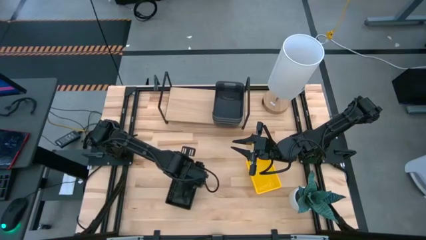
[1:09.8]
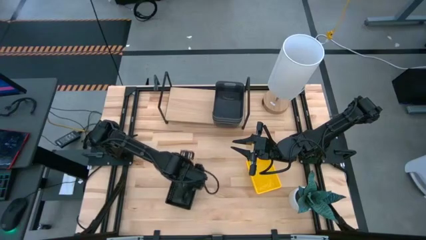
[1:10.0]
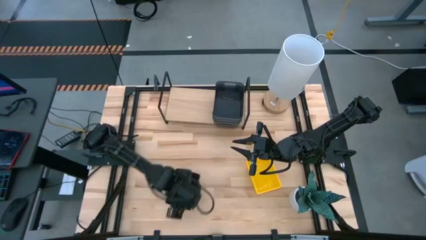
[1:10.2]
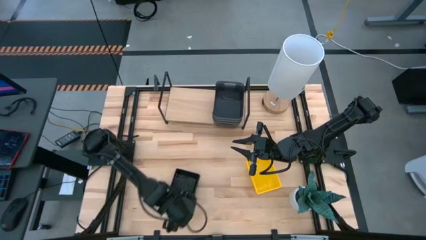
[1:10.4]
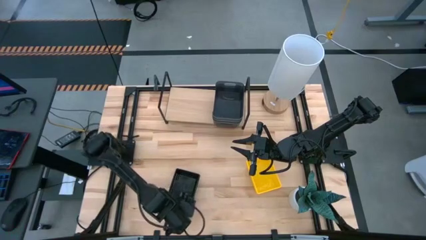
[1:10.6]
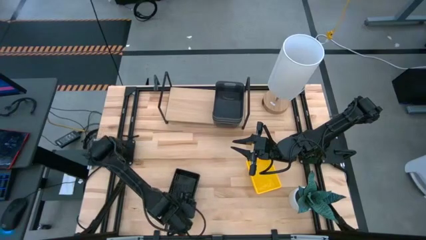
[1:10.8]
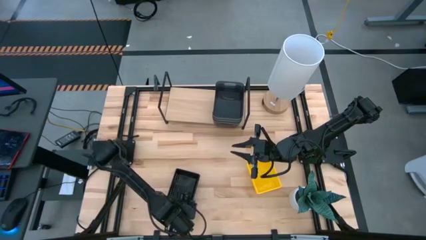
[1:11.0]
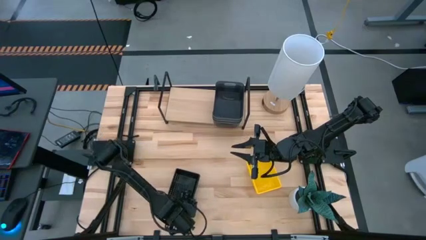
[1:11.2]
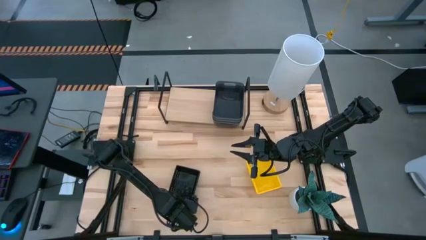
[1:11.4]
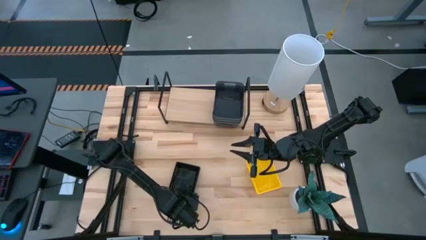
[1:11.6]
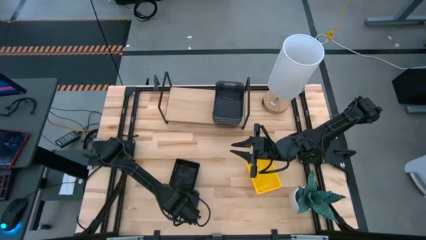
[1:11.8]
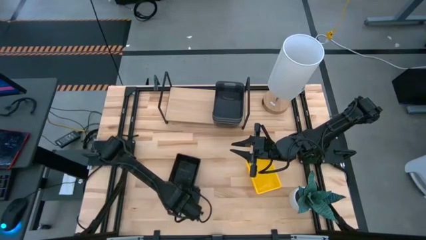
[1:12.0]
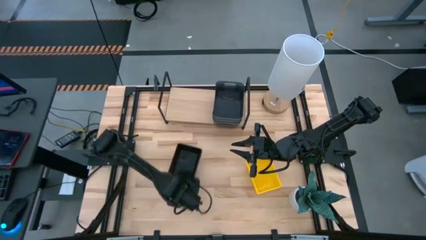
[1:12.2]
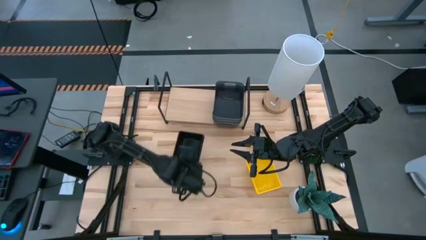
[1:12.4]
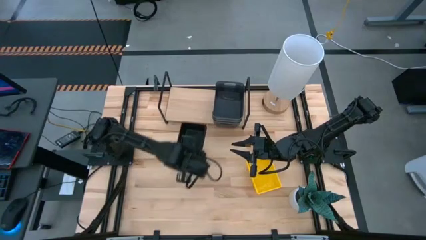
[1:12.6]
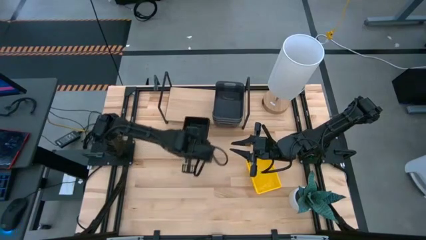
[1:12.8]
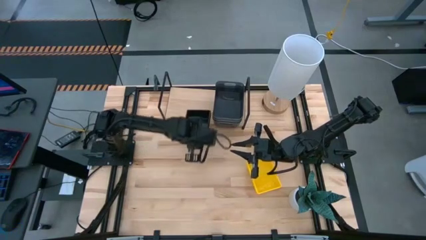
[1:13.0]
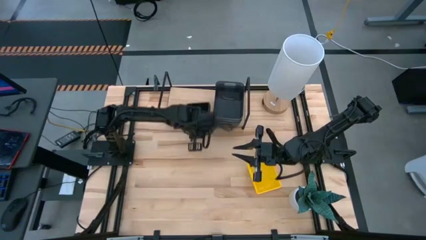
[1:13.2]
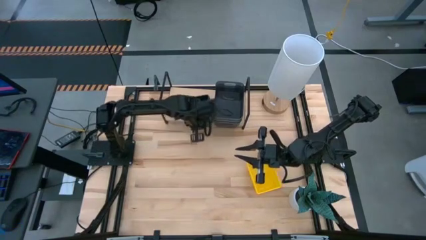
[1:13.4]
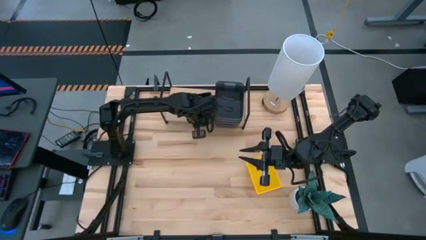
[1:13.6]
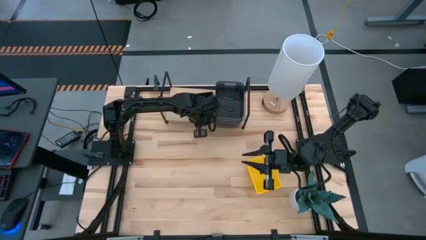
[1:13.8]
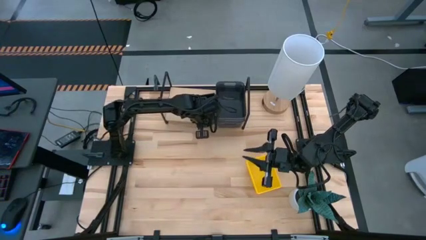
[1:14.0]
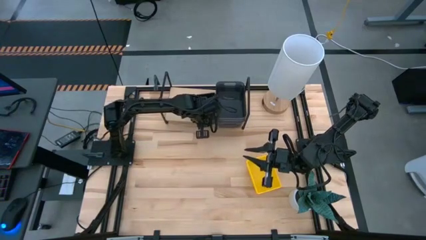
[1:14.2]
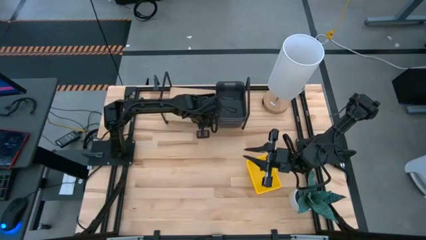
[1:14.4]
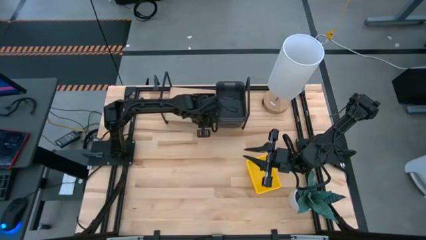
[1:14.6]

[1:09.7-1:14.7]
Task: Stack baskets on shelf by color
Put the stacked black bins on the shelf

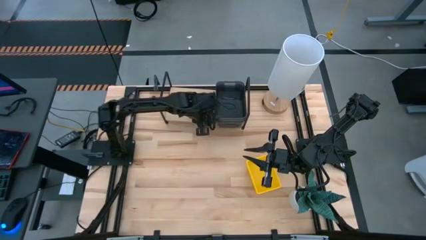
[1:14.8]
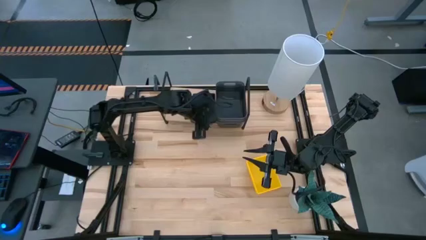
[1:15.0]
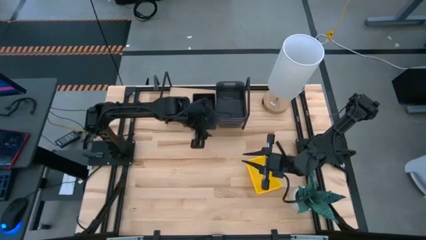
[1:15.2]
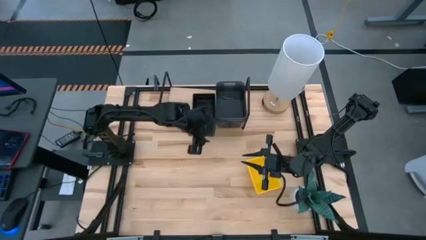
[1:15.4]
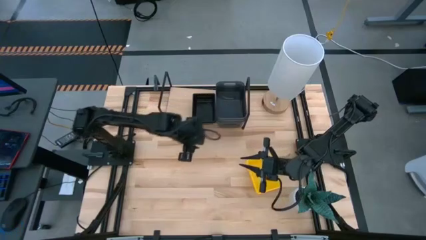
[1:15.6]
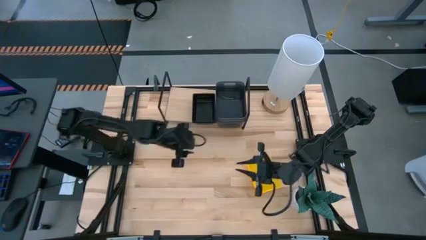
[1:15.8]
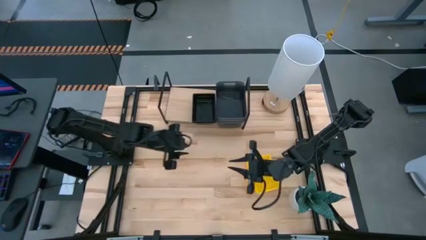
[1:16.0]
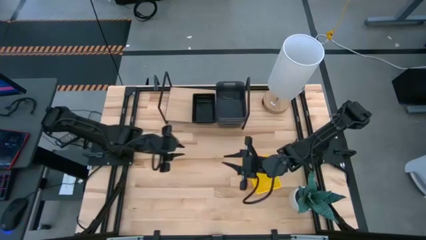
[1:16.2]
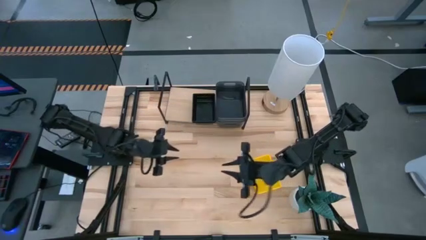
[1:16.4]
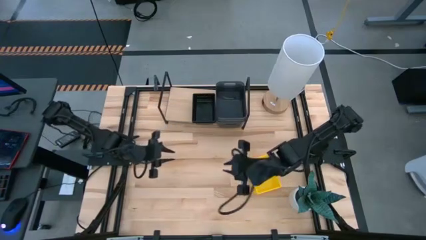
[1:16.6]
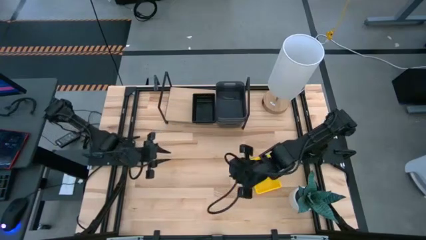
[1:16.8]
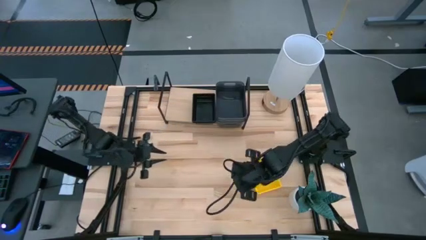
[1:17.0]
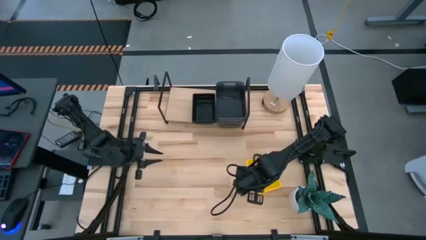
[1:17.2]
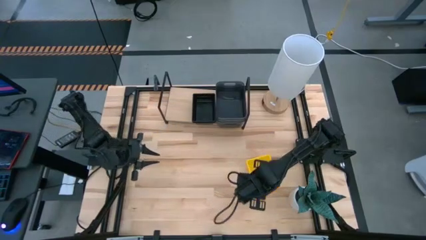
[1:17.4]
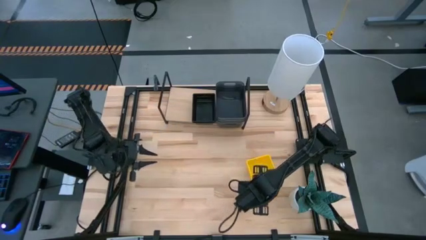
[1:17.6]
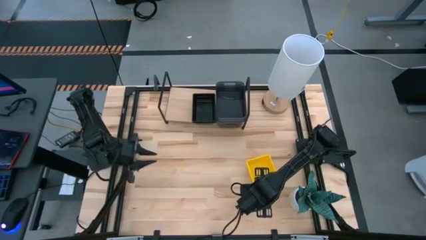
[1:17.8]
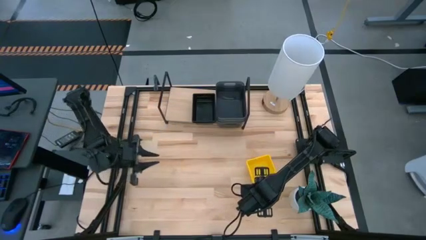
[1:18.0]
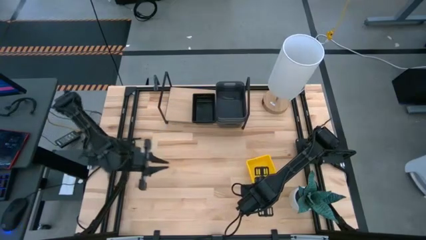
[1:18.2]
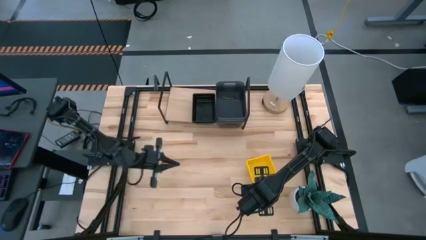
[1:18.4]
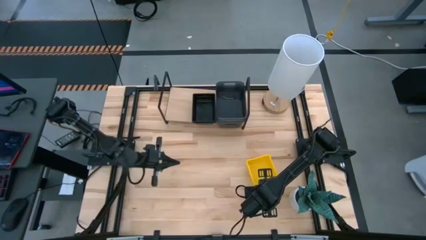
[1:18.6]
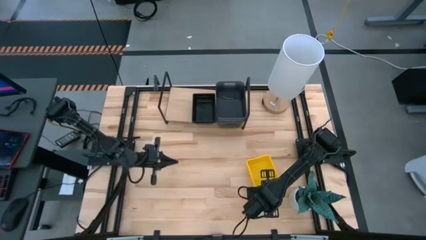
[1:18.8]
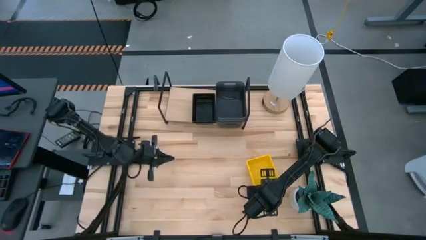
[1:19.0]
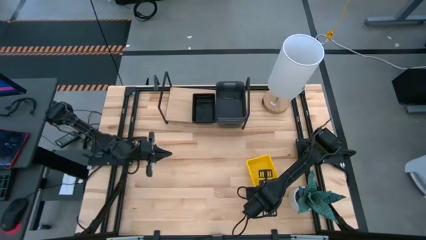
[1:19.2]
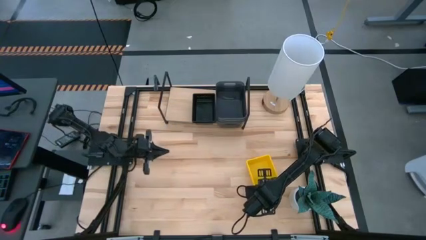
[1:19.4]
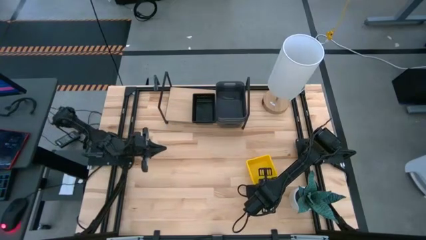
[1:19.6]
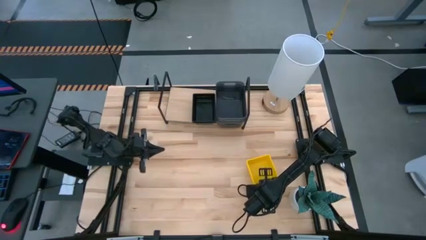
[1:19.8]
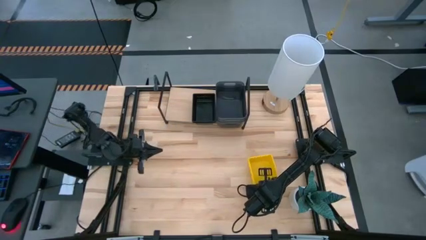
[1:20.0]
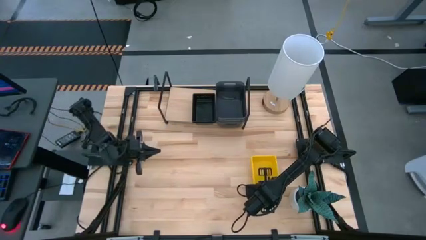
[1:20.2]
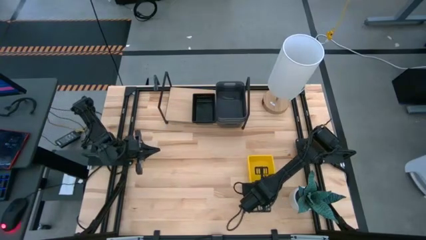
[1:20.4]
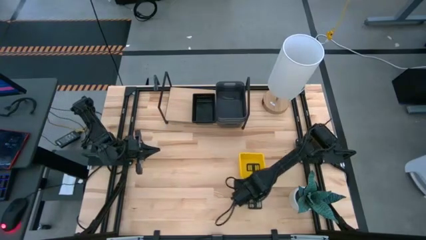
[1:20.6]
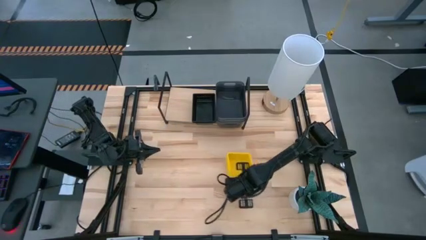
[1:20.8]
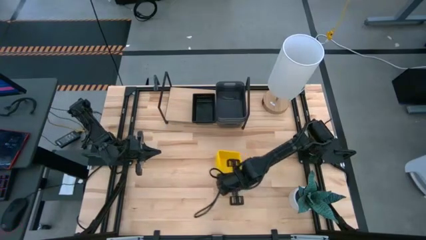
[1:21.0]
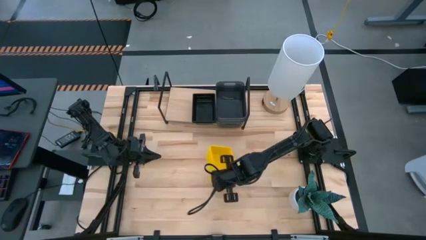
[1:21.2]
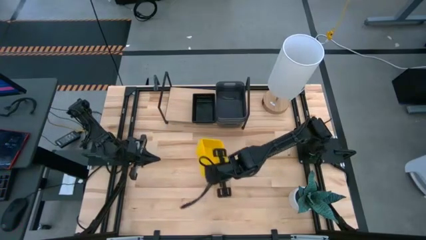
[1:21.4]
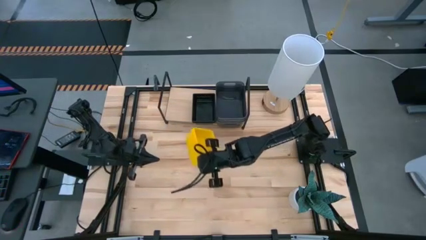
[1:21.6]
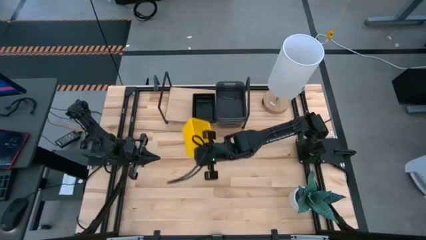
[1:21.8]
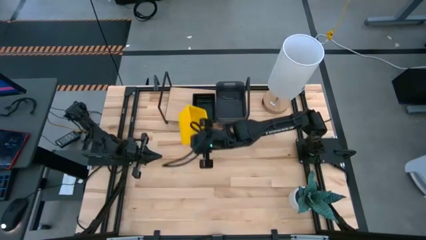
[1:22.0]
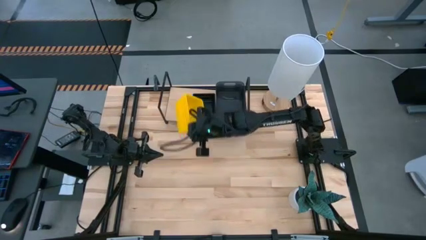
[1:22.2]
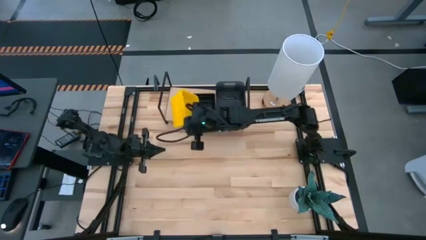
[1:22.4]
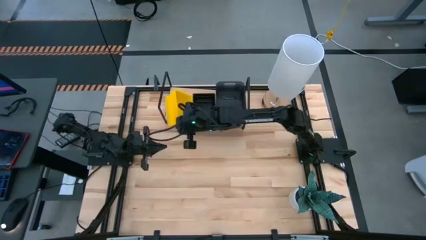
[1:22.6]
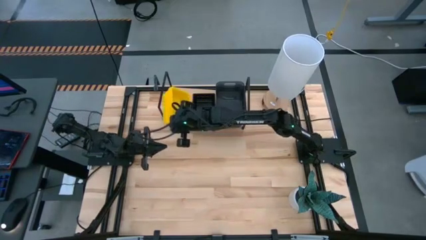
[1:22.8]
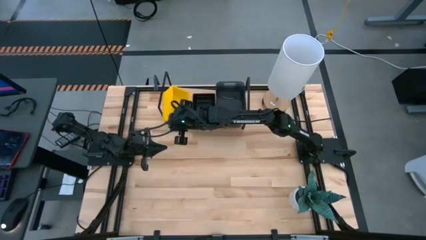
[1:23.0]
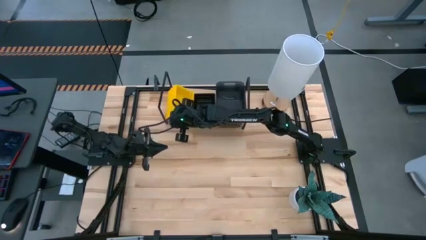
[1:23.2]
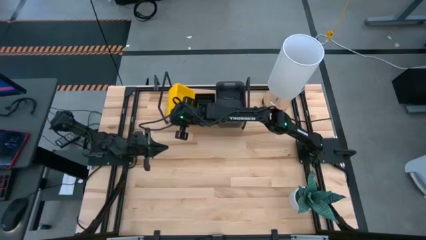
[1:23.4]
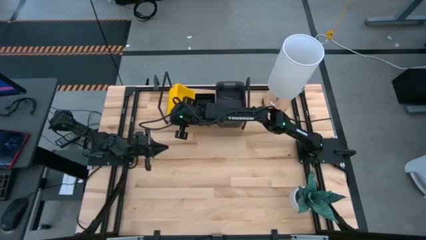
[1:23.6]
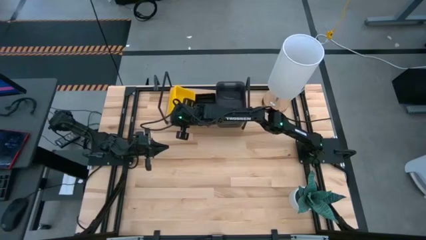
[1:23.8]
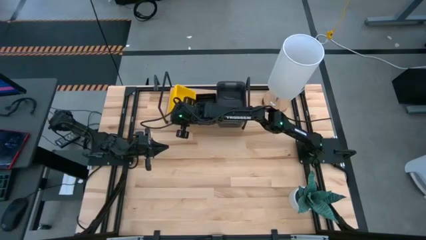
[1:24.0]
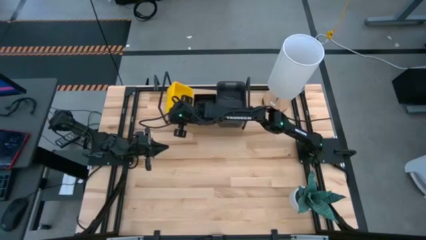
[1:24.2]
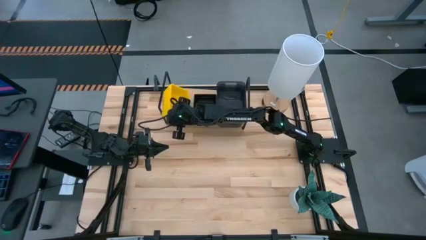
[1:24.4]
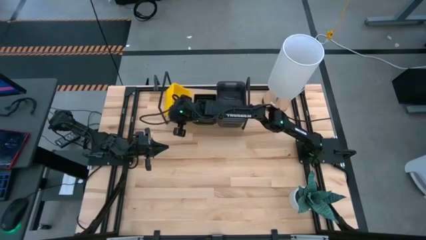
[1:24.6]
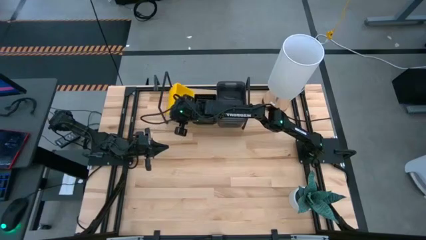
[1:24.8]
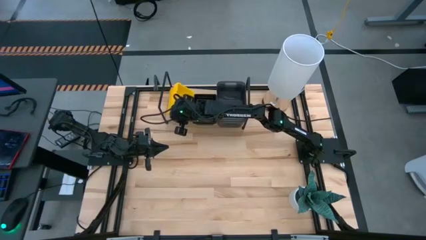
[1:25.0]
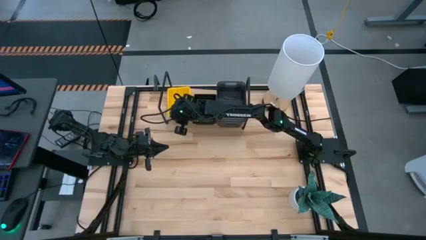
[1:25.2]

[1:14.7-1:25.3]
Put the stacked yellow bins on the shelf

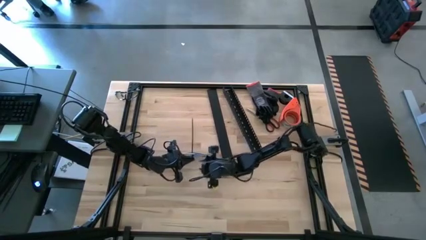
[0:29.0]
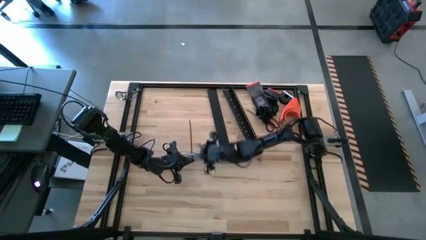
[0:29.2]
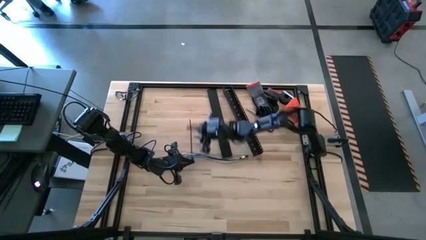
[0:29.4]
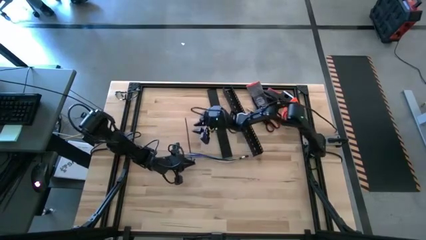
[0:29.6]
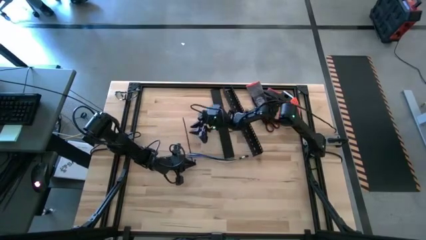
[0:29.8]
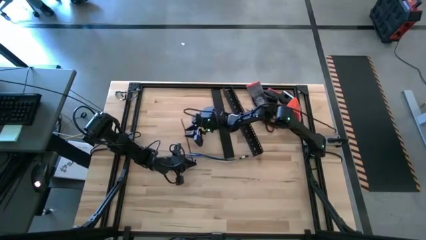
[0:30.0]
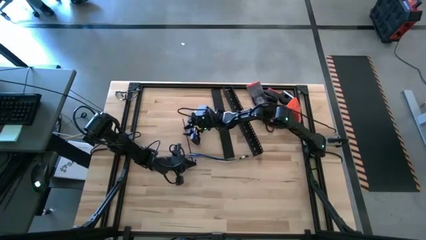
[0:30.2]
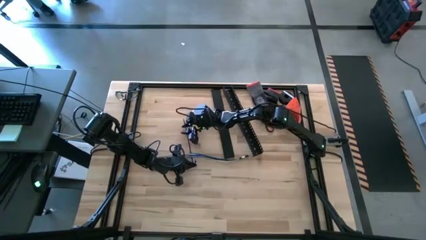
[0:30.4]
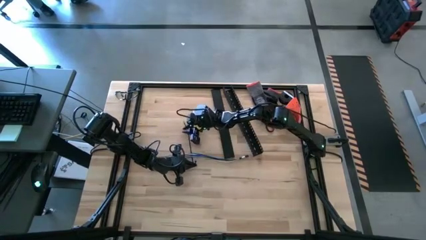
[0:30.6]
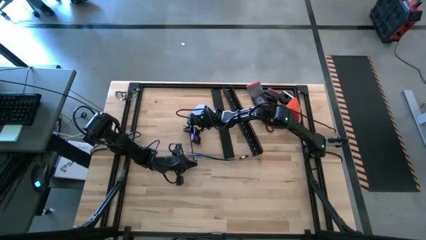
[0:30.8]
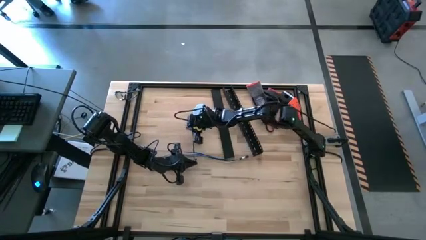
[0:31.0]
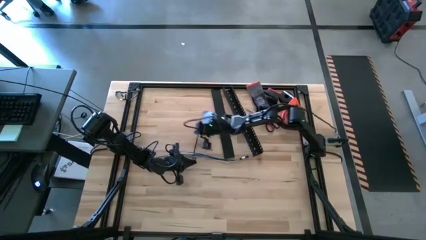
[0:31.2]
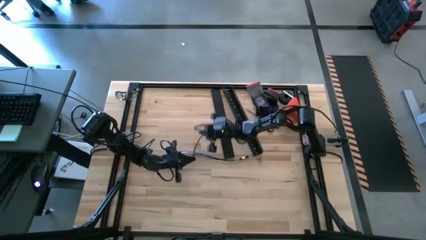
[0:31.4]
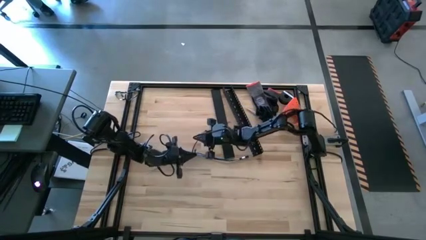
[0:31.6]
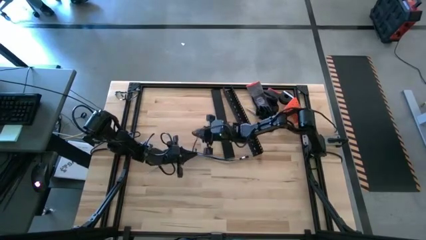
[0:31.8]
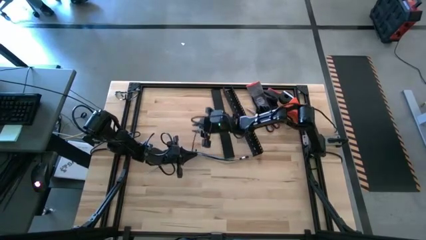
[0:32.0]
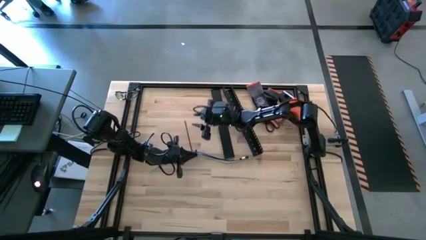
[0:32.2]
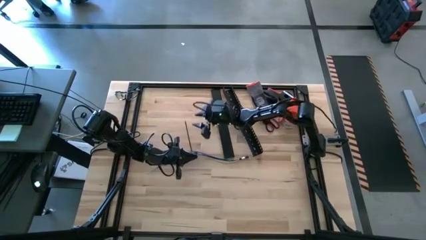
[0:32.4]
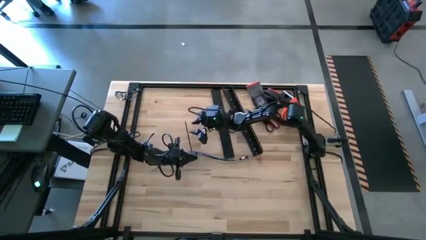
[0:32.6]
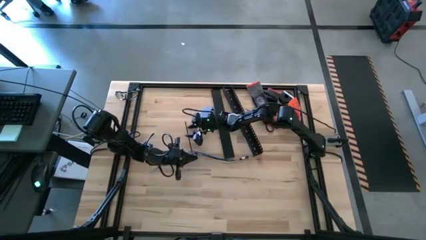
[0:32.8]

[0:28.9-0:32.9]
Task: Ziptie cables
Wrap the black zip tie around the cable wires
